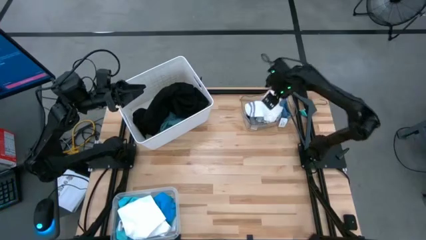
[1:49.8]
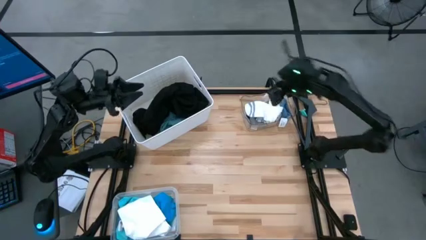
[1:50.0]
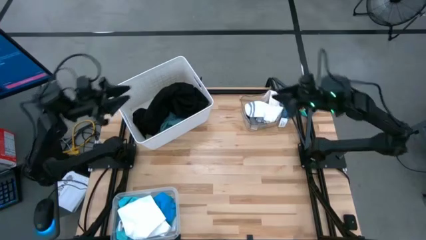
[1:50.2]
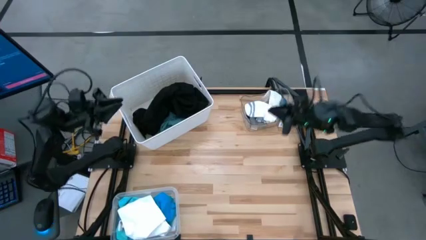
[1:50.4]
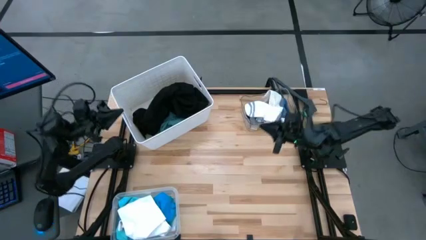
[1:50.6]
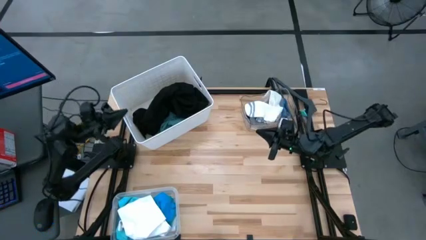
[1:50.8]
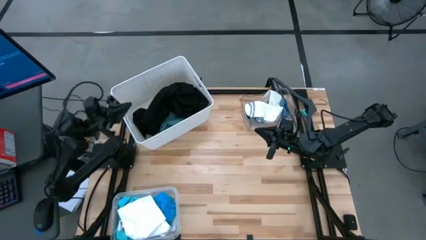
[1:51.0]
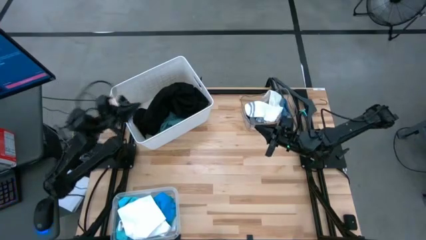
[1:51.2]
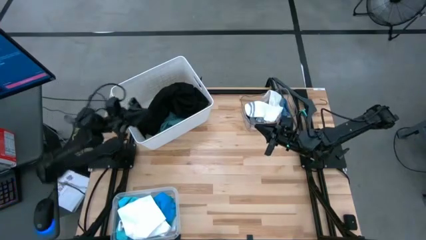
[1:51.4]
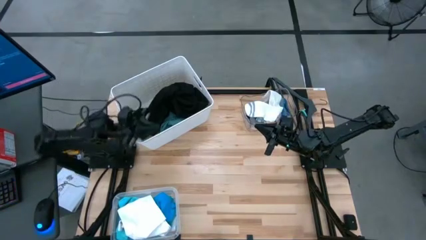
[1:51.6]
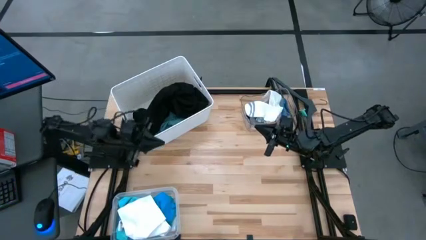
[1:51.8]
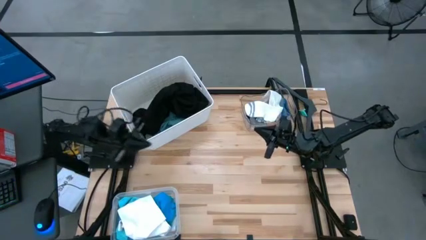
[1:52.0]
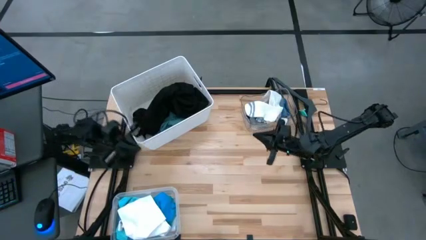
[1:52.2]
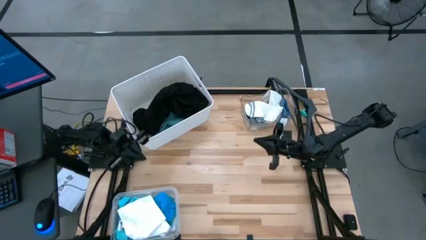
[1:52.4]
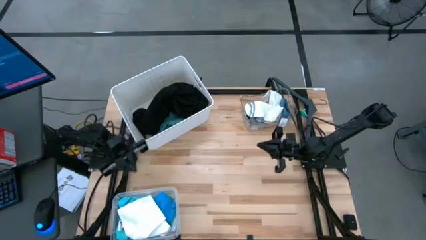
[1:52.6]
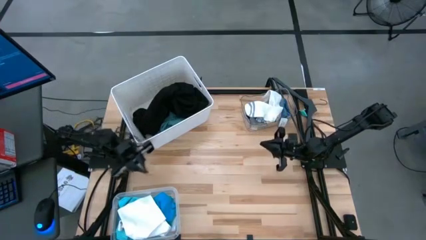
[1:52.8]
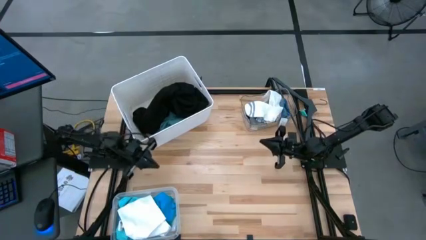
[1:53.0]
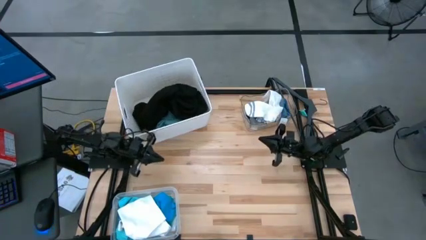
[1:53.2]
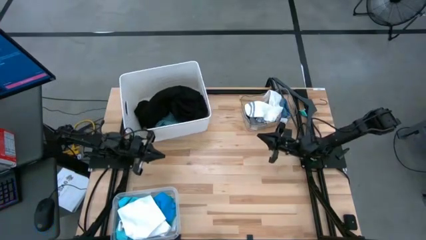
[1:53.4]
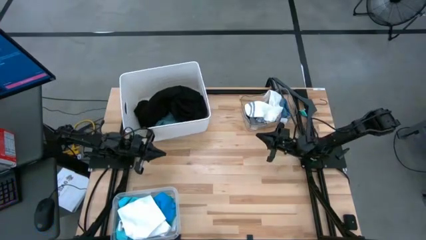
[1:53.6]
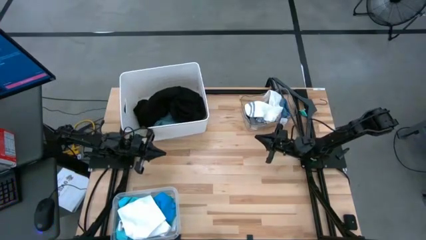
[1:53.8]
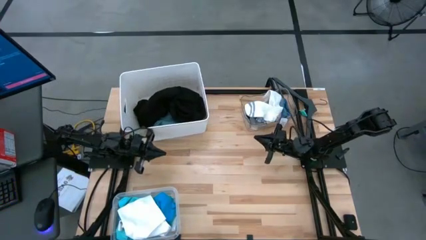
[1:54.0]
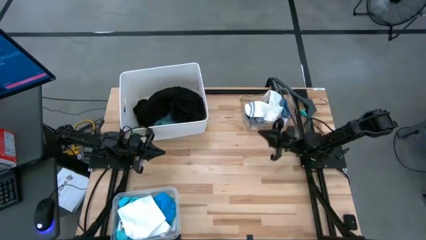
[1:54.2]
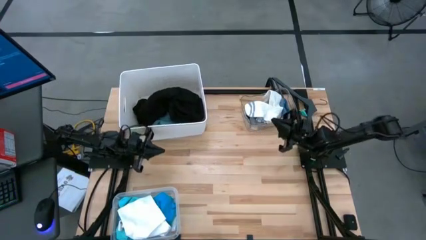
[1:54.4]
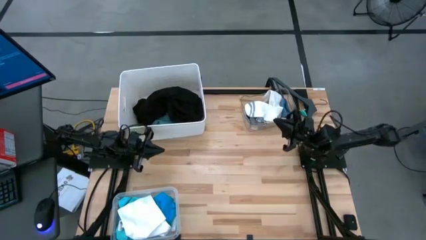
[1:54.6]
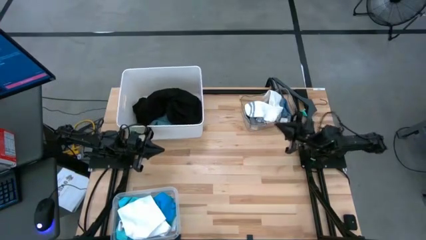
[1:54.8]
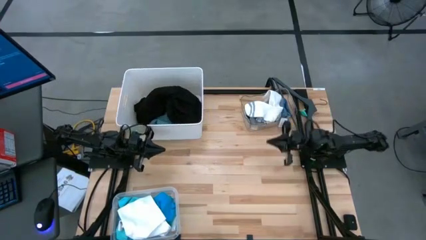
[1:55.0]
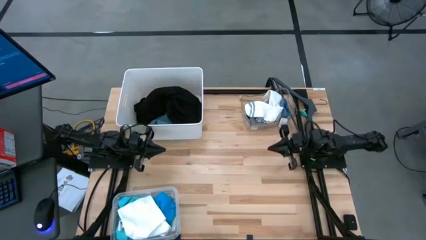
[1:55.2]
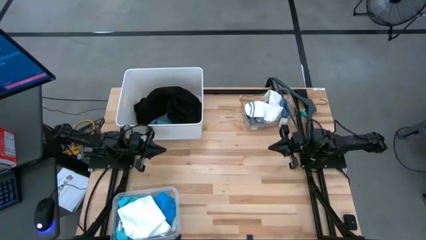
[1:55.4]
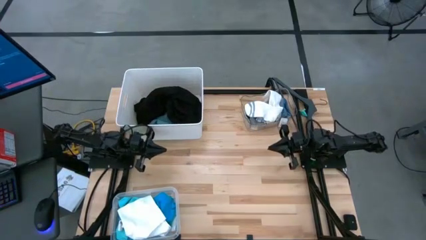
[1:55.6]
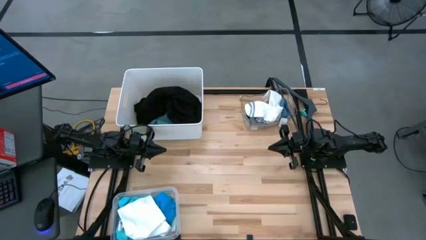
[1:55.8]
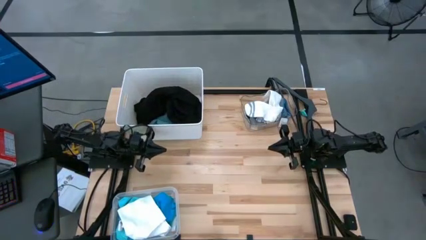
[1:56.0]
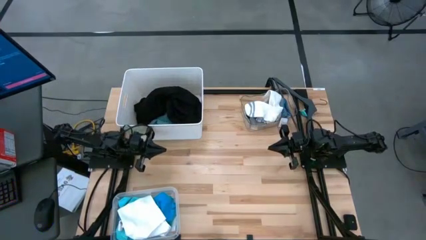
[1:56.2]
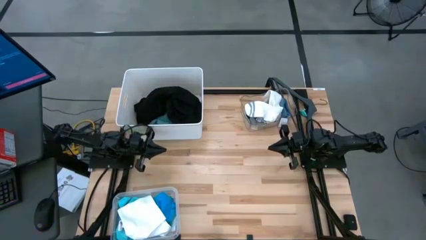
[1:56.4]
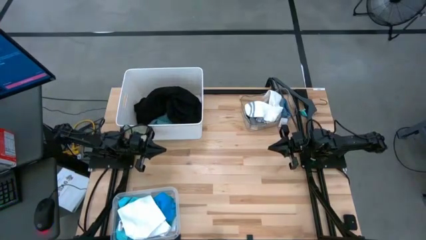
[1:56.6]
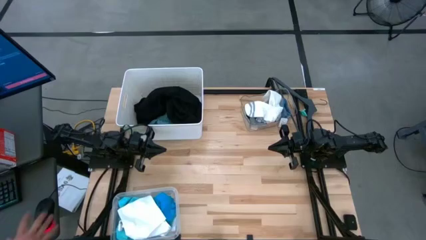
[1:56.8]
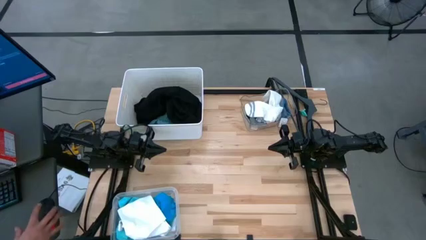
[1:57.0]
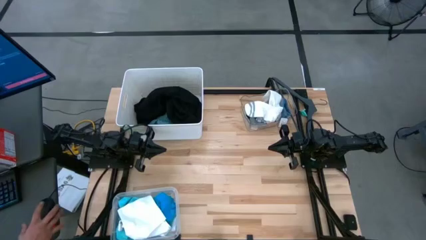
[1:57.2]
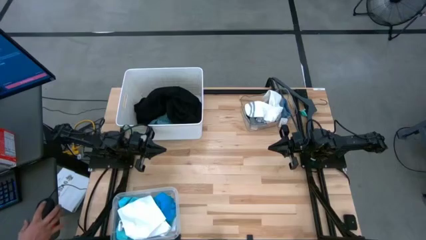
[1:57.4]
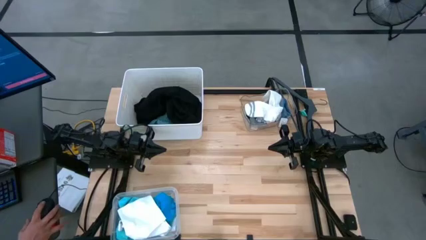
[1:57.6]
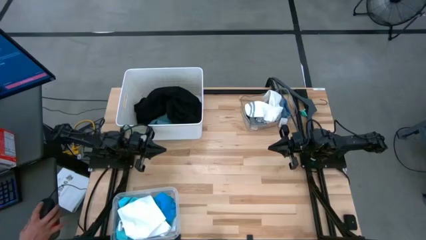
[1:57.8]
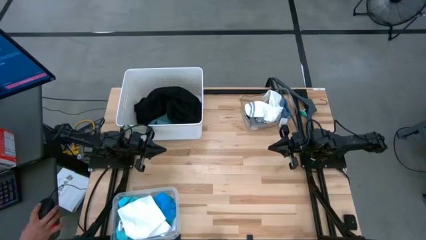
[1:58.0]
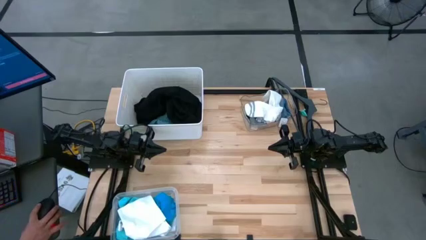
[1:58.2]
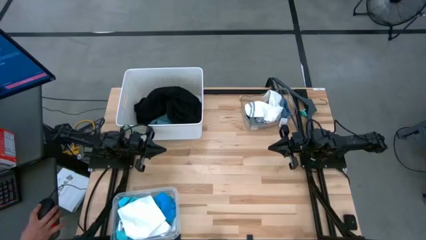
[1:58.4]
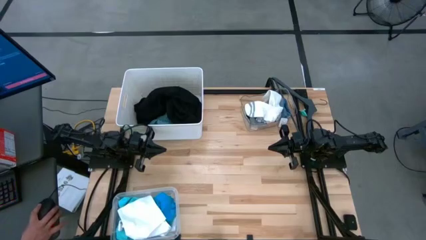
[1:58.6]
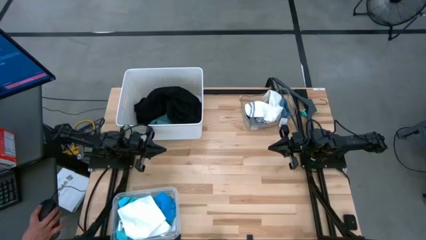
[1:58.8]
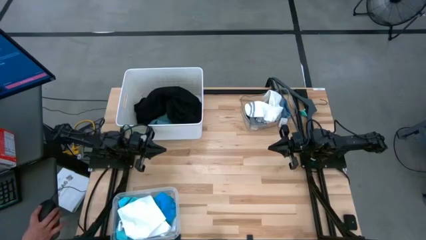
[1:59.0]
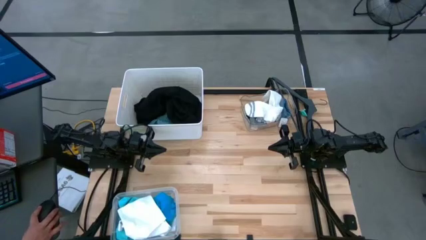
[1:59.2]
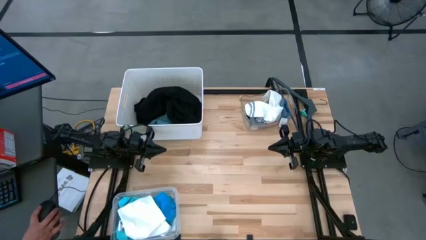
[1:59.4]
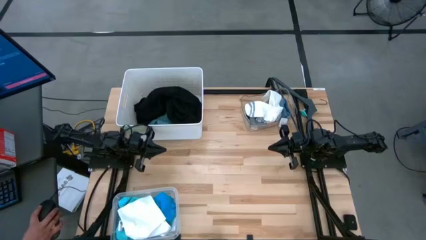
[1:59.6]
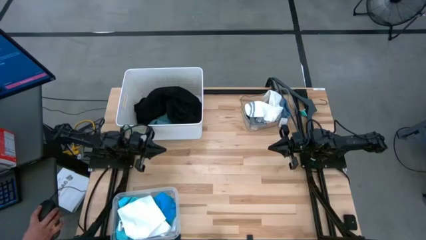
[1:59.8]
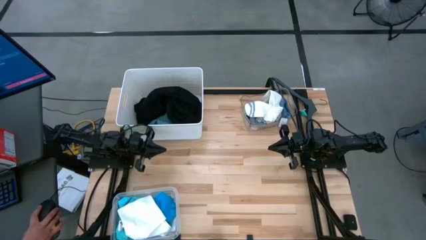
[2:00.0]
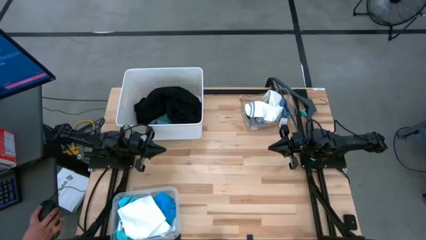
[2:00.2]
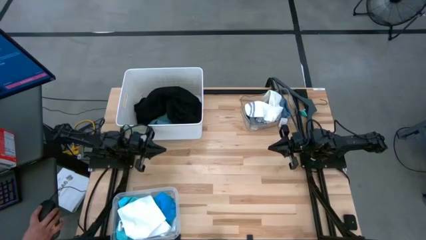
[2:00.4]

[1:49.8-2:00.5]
Task: Pick & Place Cloths
Return to Home Position

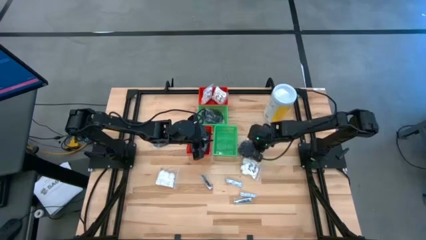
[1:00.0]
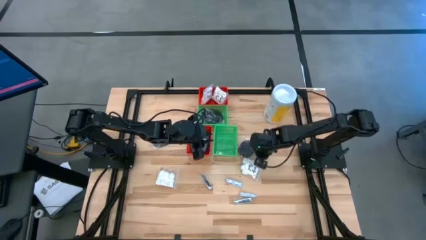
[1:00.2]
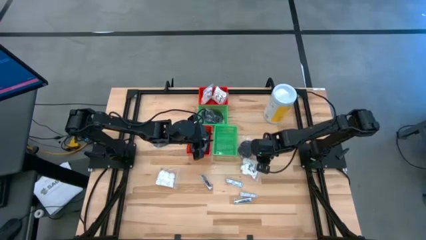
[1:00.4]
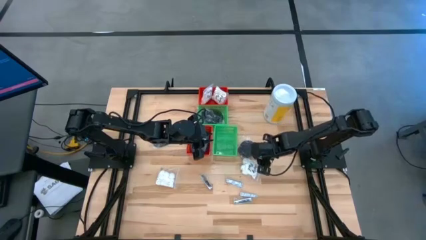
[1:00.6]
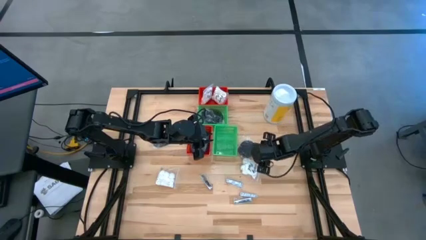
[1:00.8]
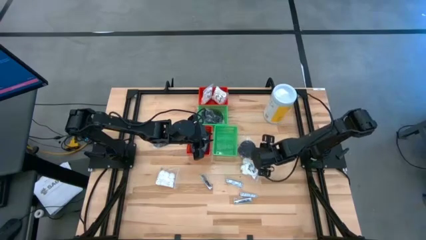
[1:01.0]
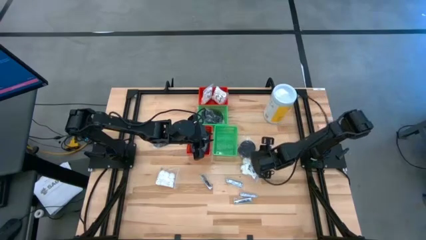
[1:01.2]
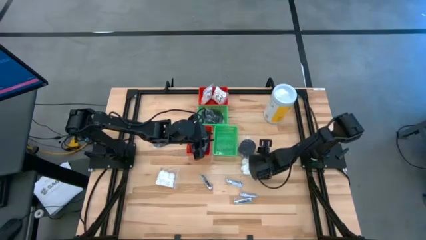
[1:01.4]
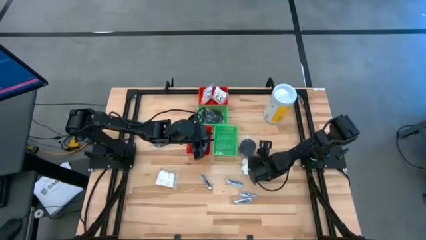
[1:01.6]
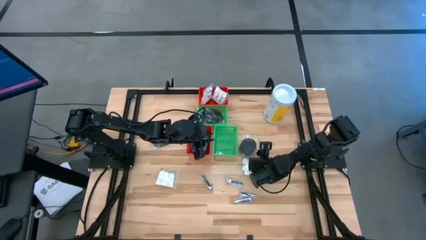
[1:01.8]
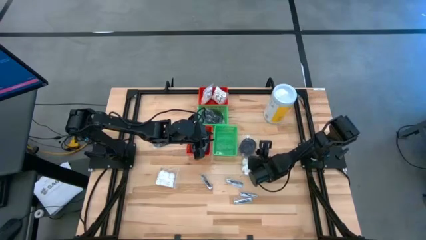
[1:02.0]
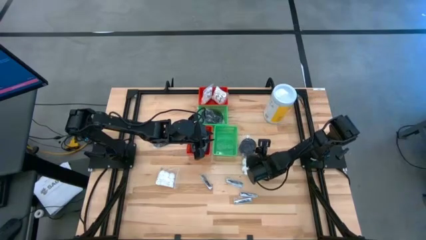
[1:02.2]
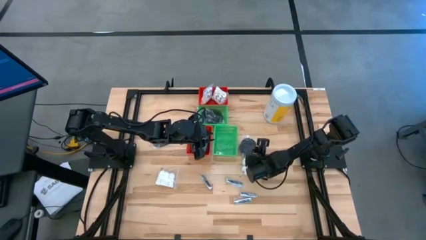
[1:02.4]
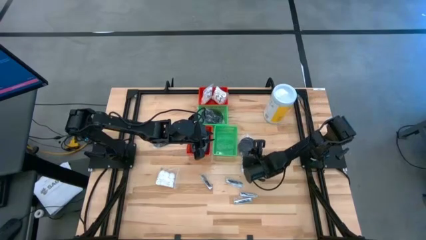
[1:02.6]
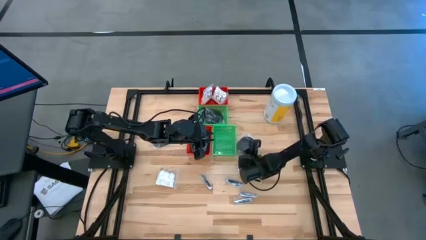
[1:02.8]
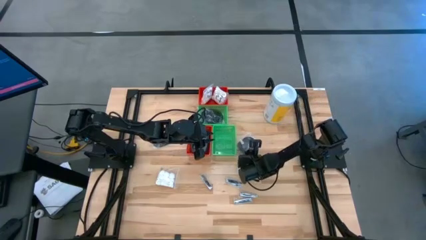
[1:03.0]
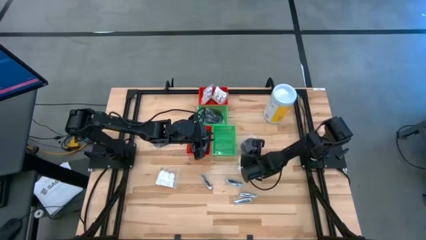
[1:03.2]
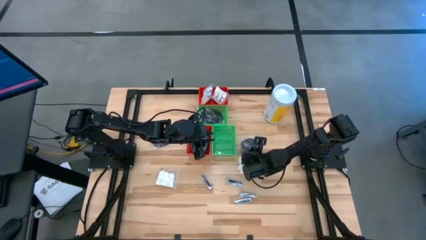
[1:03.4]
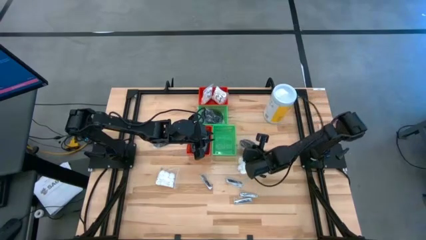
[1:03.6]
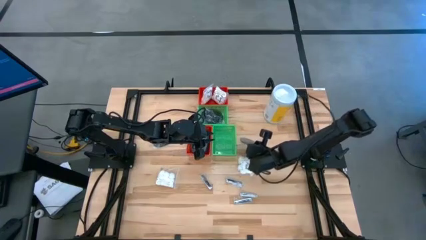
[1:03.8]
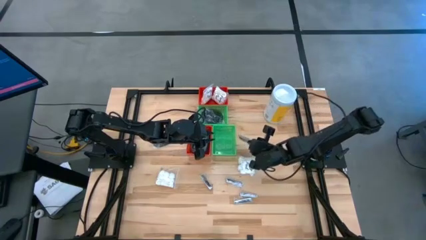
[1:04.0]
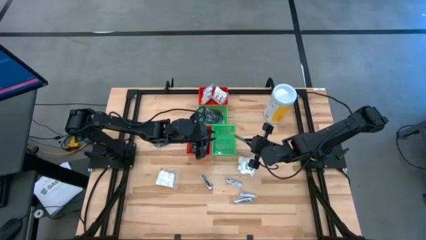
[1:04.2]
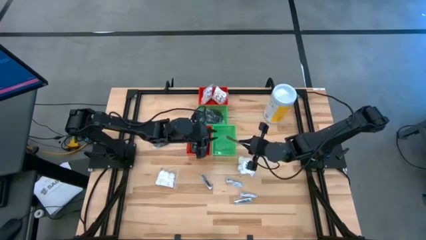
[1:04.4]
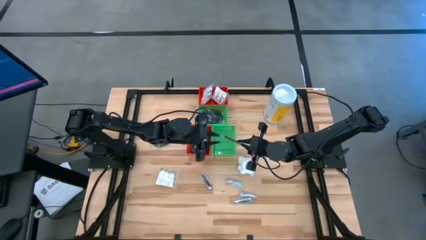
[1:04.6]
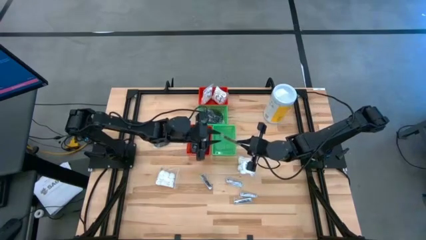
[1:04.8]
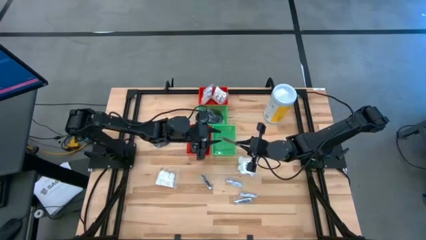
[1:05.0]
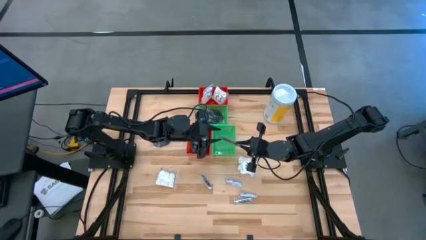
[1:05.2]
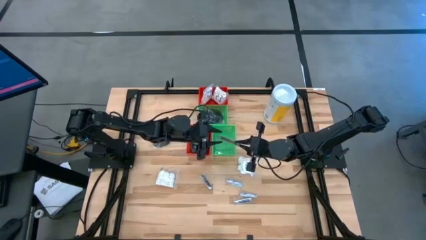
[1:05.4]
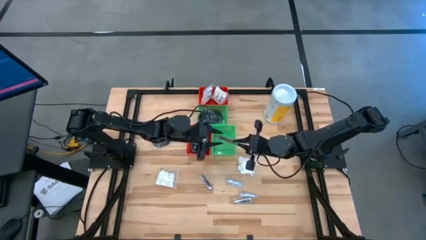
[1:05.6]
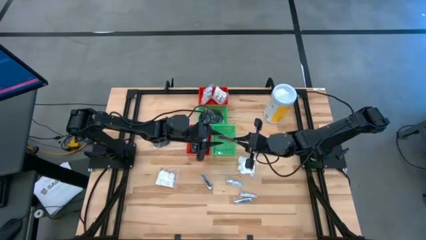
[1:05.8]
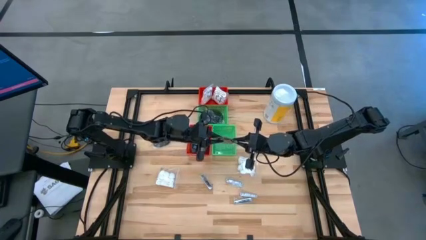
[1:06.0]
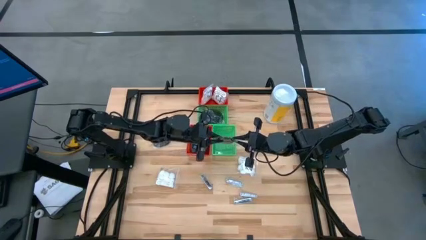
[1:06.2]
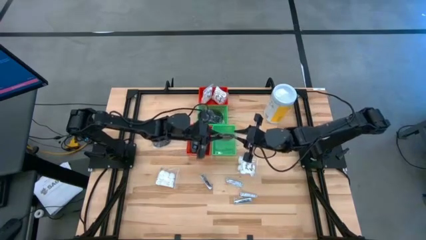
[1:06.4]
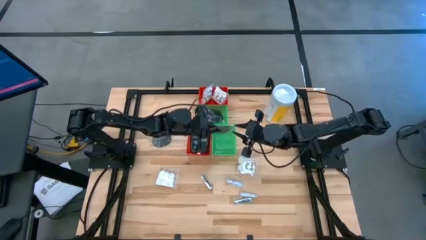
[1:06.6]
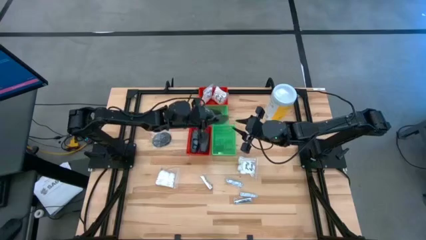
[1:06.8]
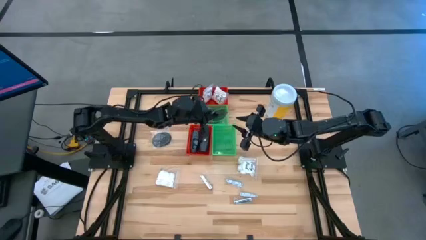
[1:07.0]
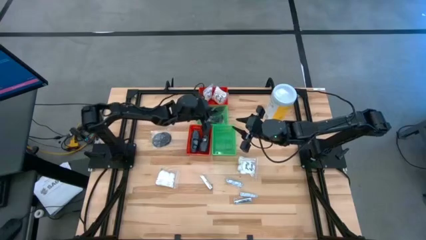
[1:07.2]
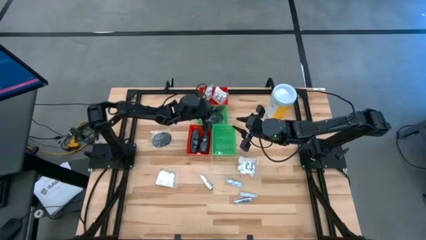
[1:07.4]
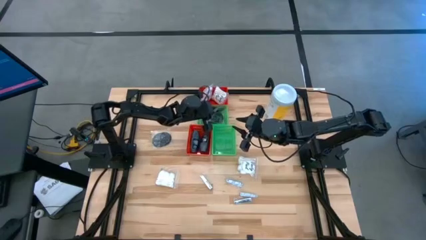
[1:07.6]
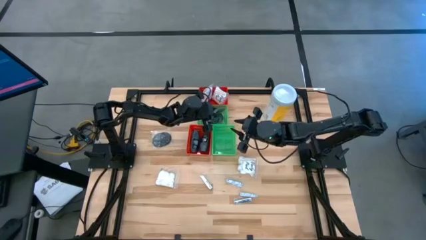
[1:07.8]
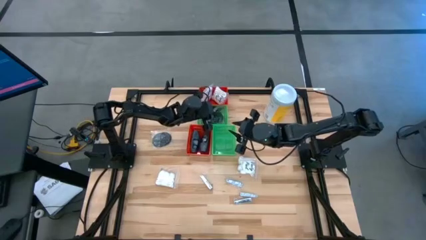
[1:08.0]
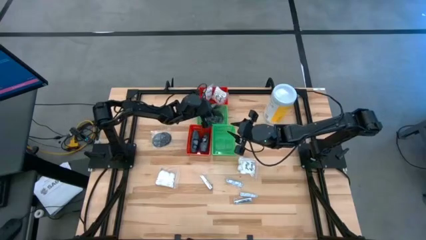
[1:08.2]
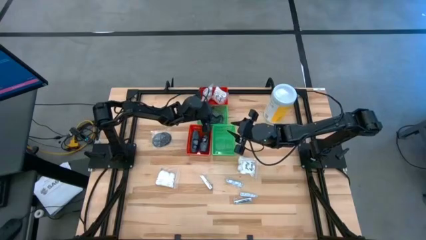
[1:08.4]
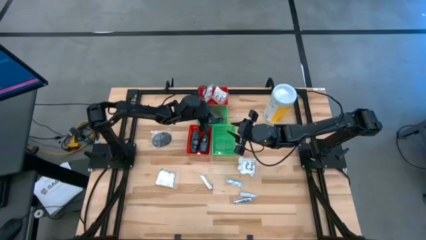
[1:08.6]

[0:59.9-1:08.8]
Task: Pick & Place Travel size toiletries
Put the black hairbrush into the top green bin
